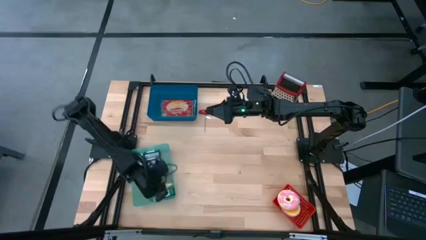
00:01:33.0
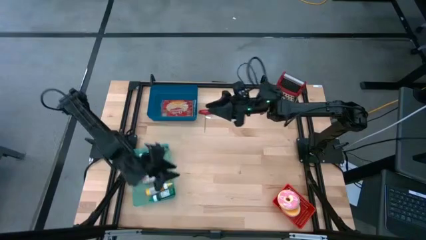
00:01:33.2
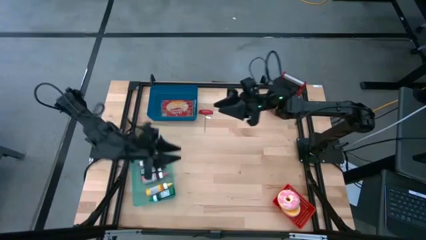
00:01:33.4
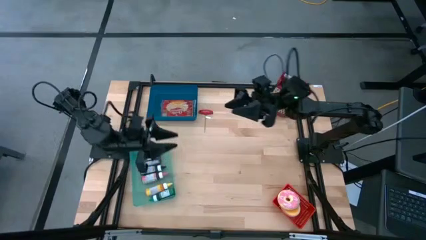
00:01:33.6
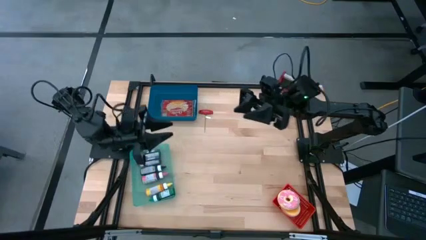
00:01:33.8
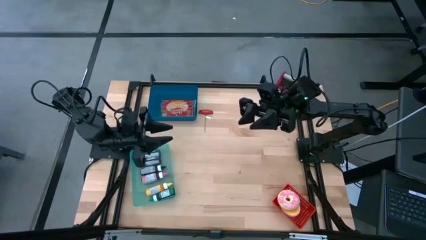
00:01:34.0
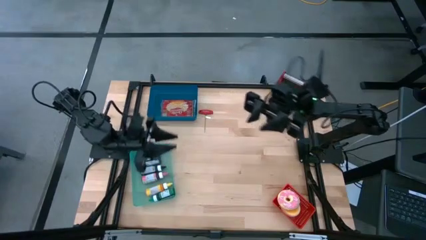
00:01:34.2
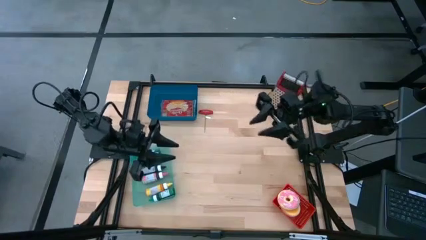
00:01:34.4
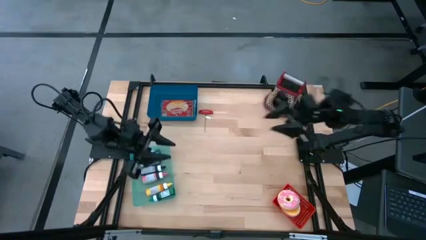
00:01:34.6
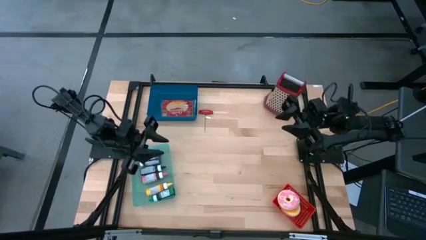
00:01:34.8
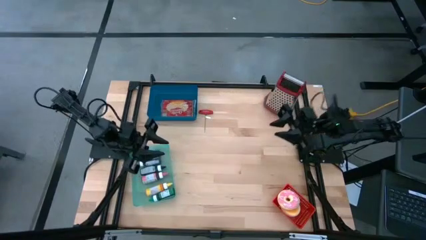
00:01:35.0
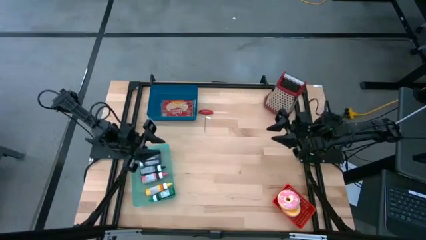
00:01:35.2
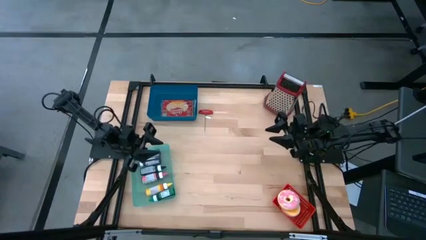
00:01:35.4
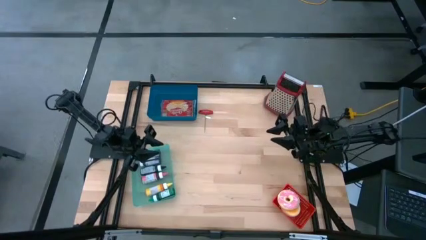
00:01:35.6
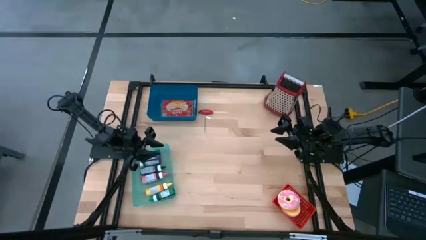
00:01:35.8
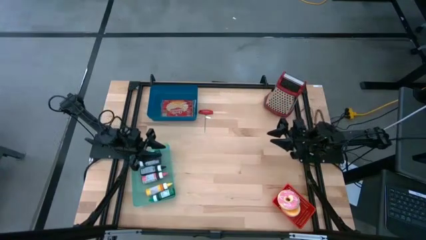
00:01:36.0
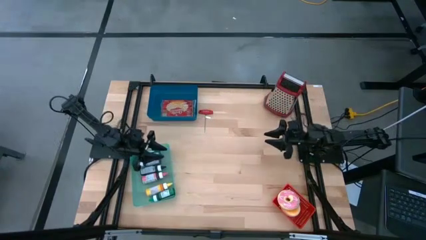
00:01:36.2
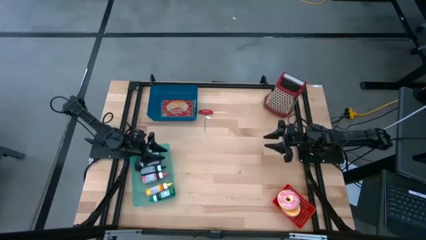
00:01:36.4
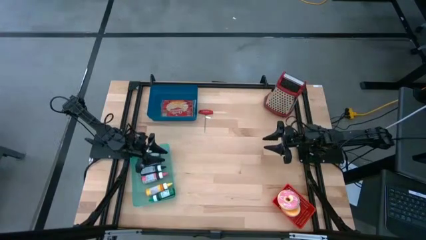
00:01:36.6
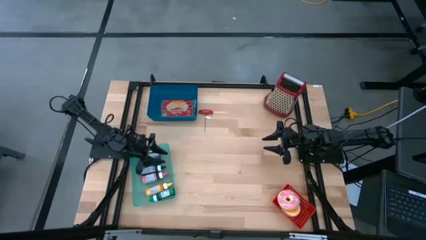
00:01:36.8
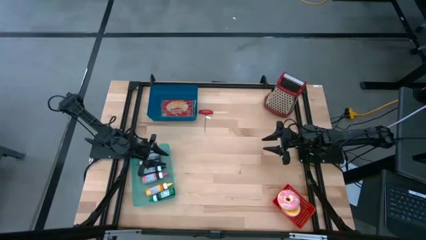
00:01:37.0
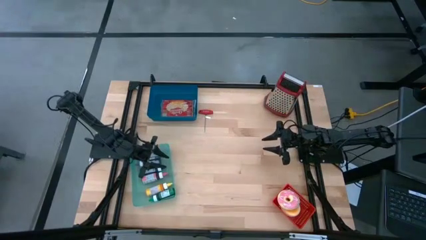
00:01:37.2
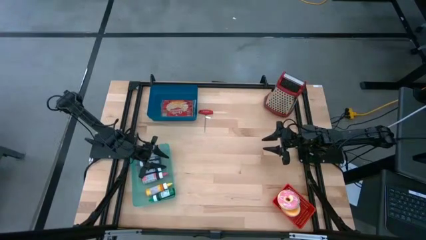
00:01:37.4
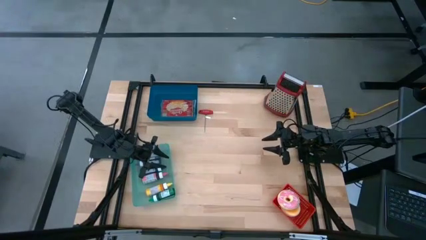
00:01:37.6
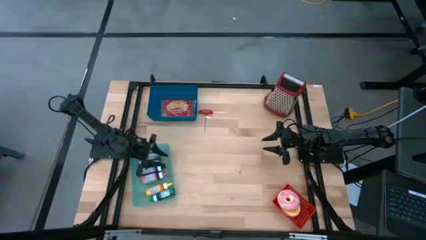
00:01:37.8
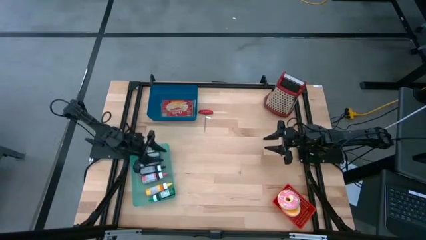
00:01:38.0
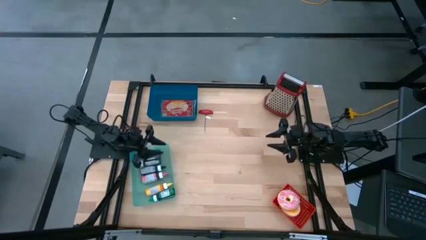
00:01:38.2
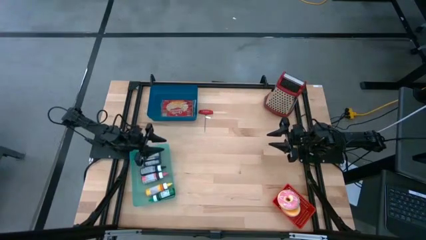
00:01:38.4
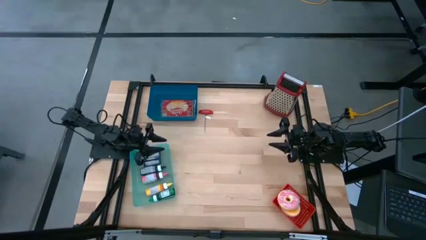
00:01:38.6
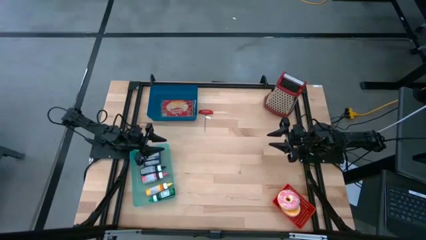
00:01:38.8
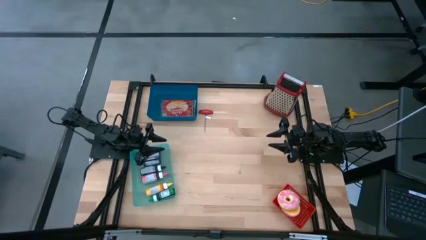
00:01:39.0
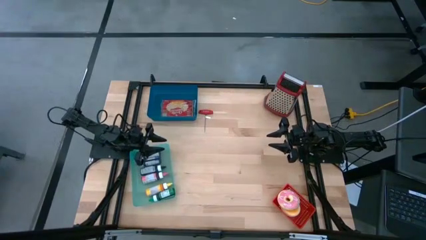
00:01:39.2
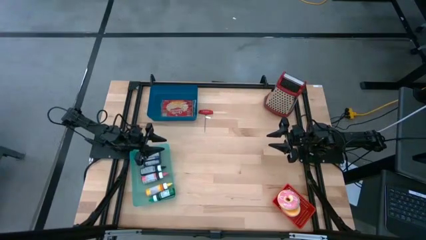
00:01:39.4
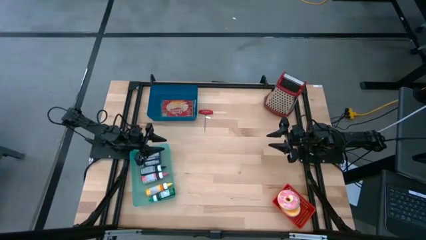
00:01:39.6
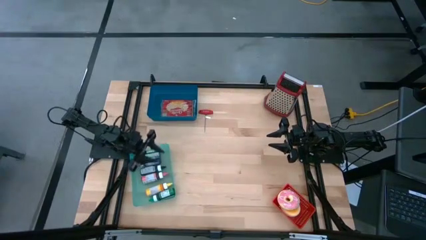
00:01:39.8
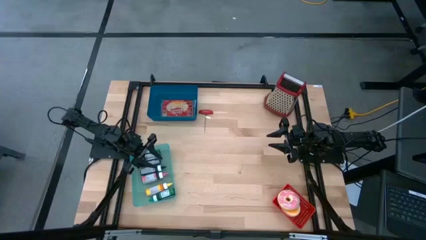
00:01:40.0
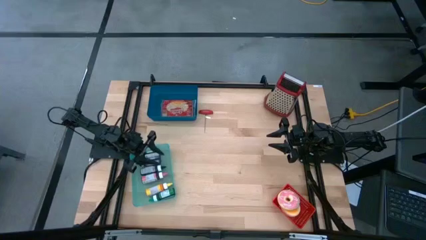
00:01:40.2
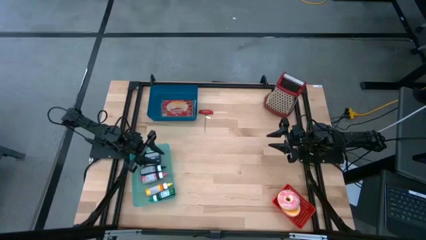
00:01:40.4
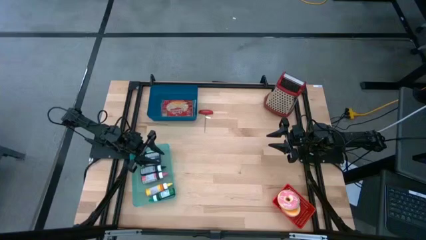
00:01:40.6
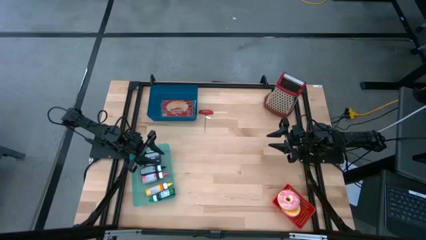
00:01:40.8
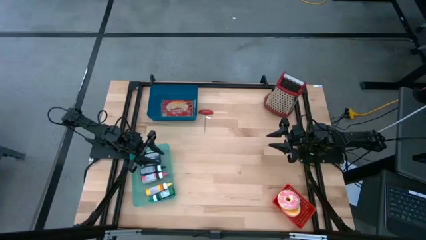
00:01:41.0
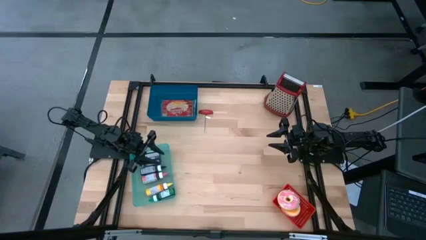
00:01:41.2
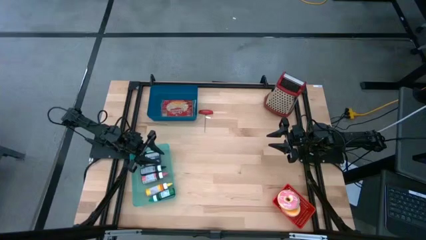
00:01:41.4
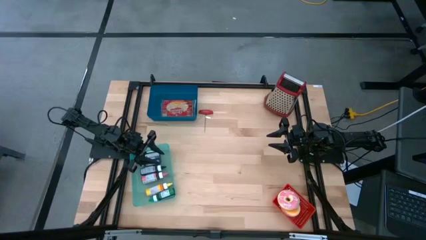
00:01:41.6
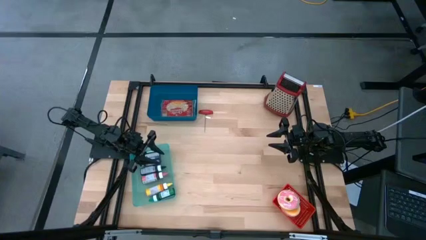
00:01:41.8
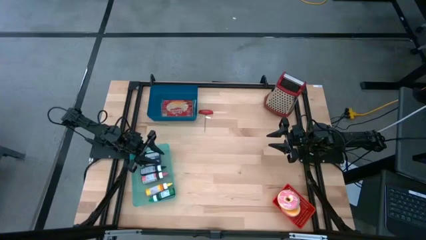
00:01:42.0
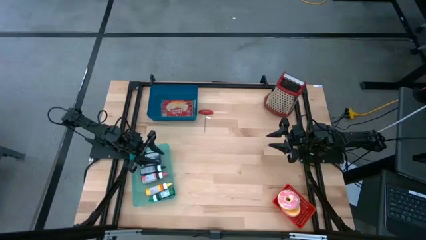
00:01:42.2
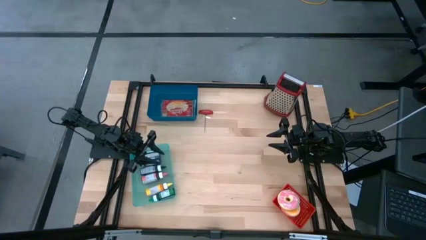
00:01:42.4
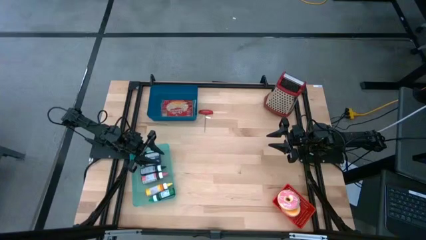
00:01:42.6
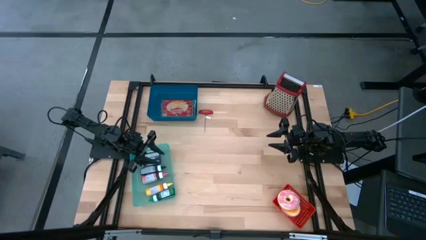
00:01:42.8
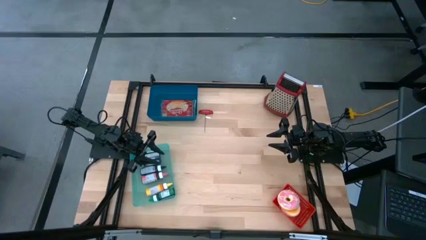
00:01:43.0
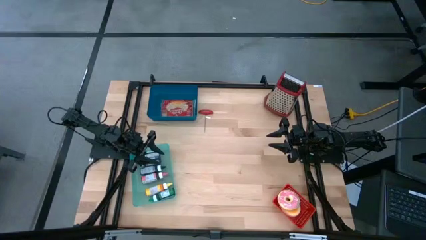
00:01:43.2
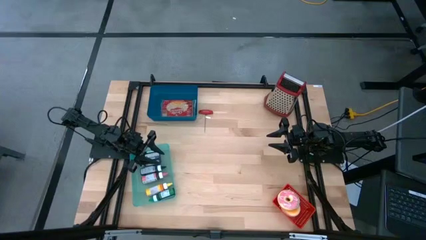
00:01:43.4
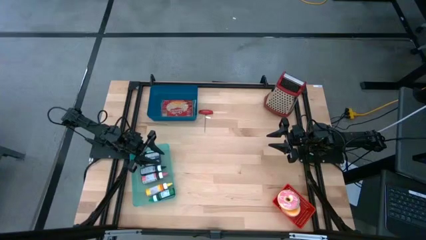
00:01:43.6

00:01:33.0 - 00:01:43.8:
Return to Home Position
